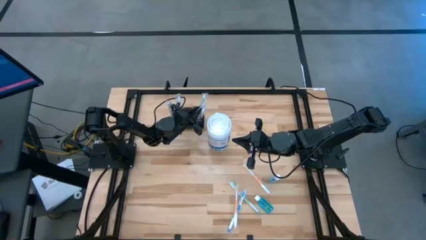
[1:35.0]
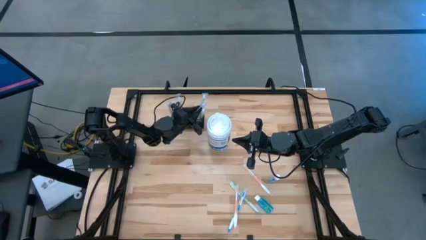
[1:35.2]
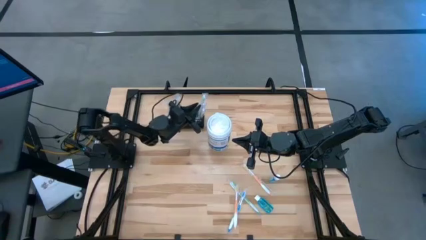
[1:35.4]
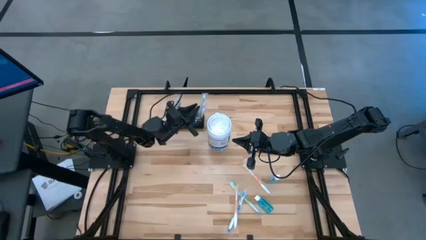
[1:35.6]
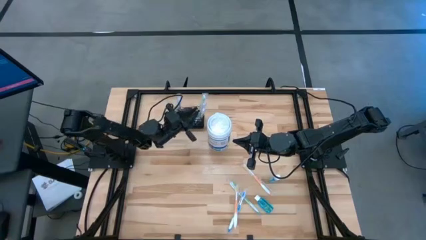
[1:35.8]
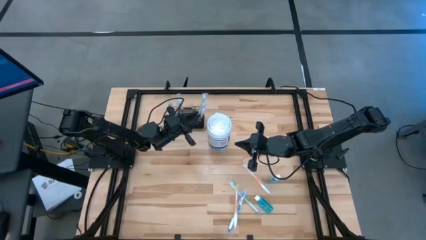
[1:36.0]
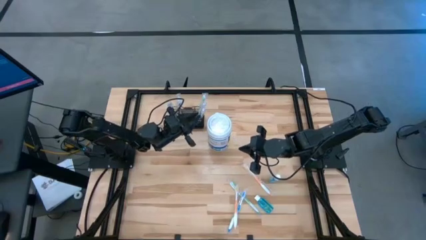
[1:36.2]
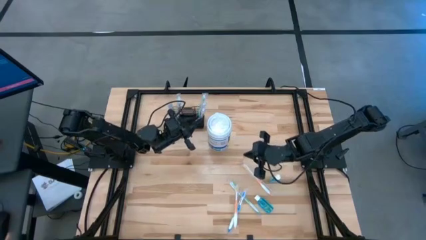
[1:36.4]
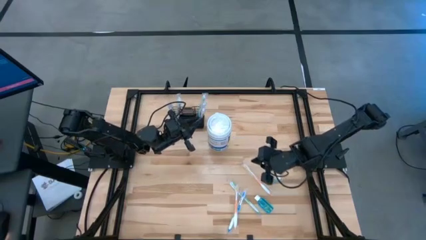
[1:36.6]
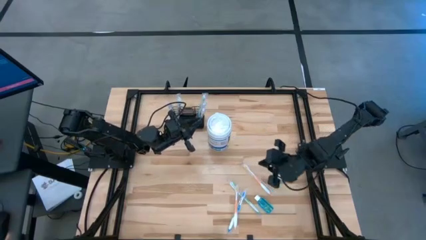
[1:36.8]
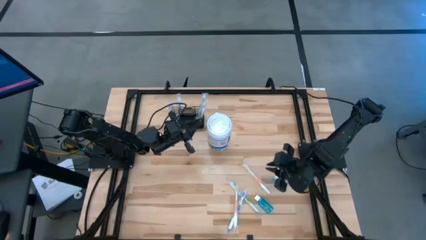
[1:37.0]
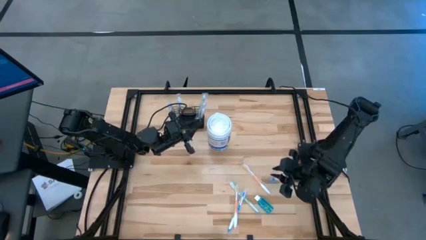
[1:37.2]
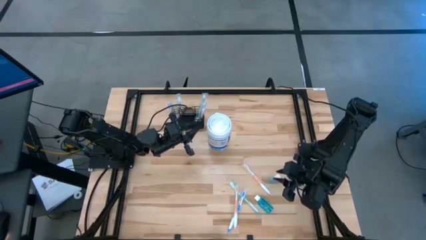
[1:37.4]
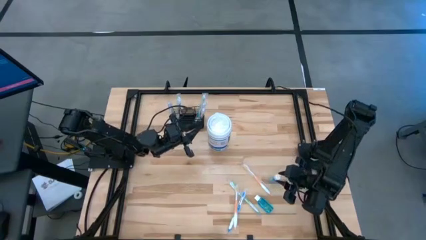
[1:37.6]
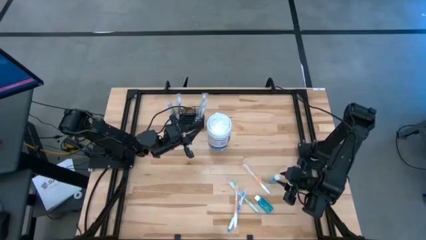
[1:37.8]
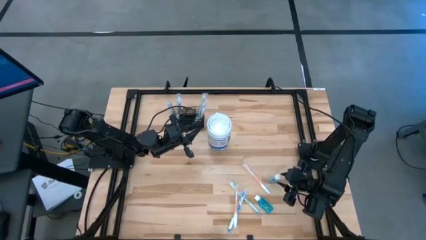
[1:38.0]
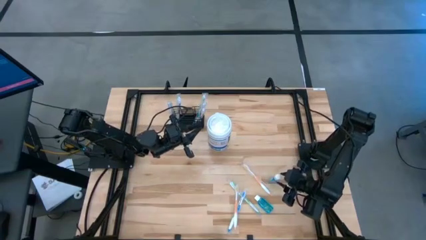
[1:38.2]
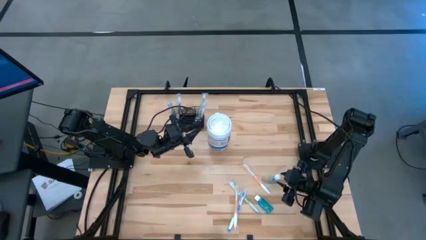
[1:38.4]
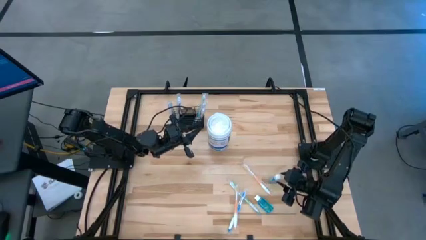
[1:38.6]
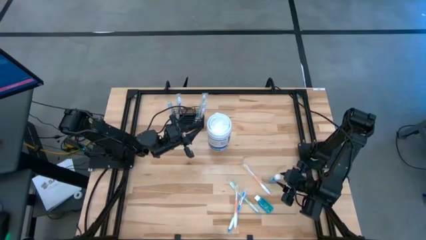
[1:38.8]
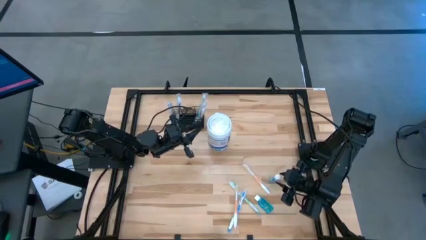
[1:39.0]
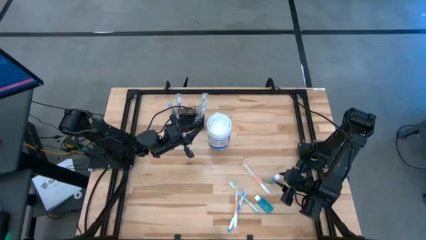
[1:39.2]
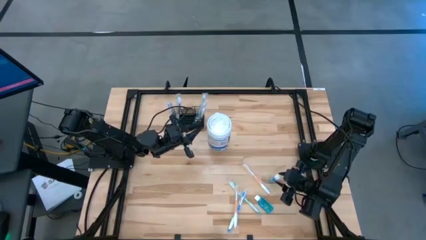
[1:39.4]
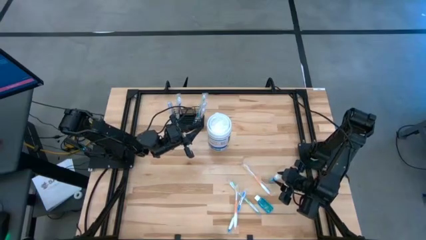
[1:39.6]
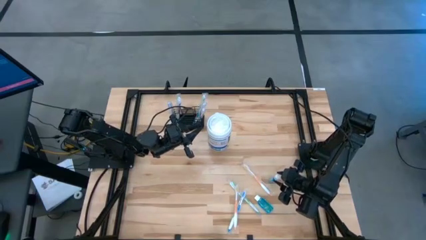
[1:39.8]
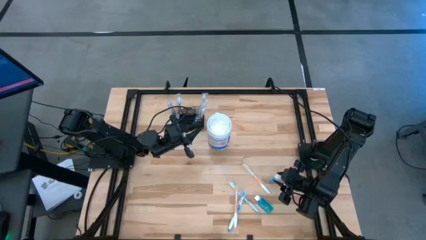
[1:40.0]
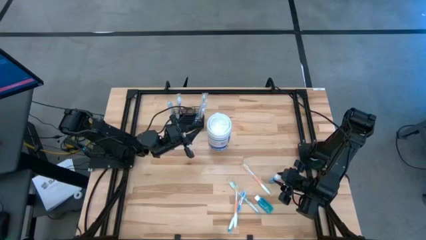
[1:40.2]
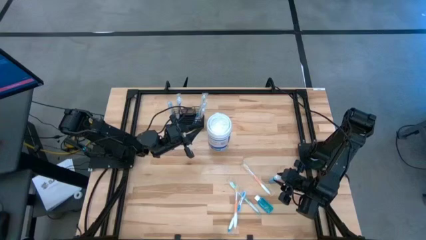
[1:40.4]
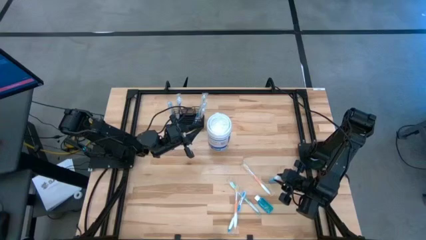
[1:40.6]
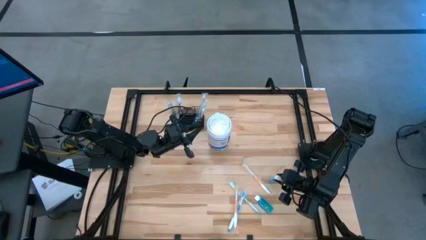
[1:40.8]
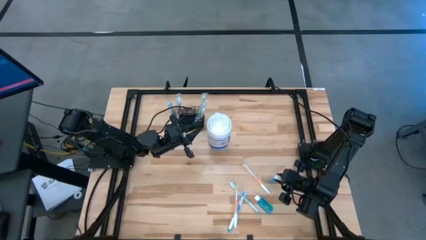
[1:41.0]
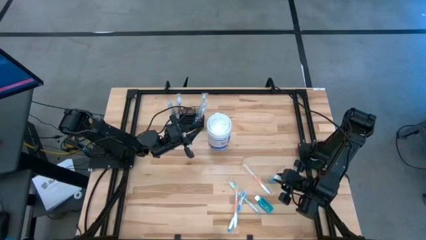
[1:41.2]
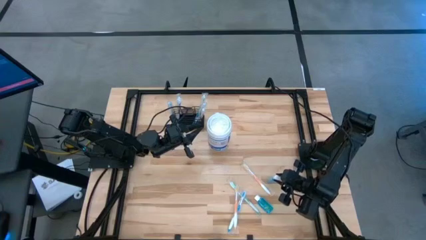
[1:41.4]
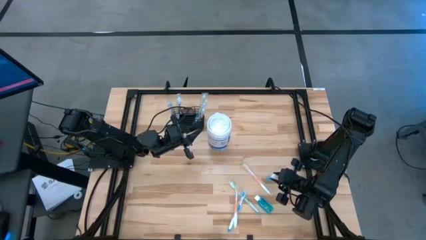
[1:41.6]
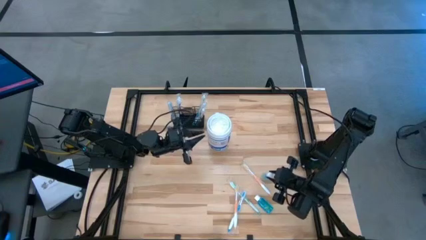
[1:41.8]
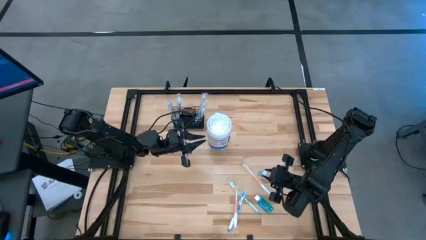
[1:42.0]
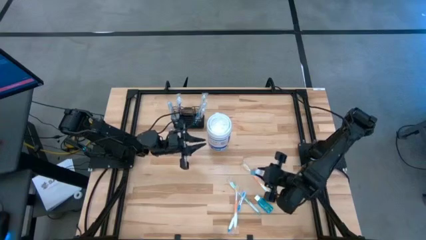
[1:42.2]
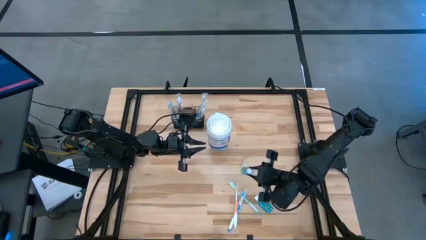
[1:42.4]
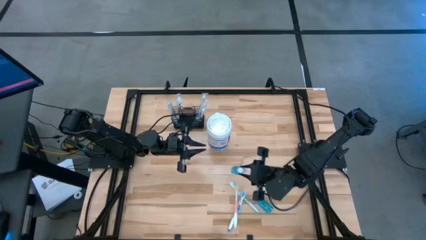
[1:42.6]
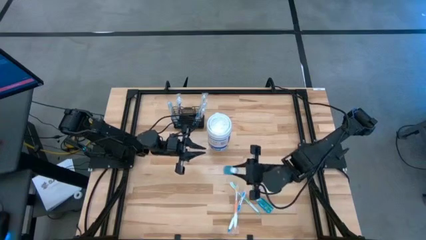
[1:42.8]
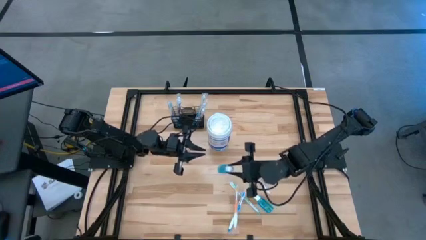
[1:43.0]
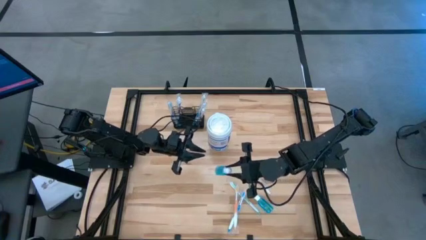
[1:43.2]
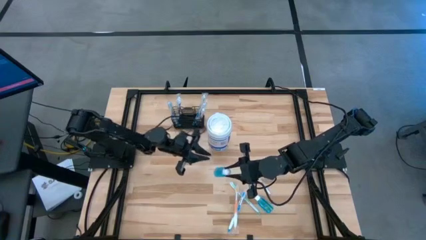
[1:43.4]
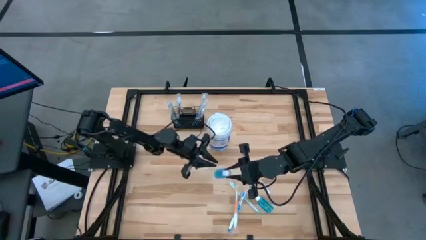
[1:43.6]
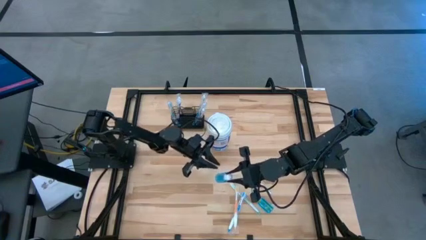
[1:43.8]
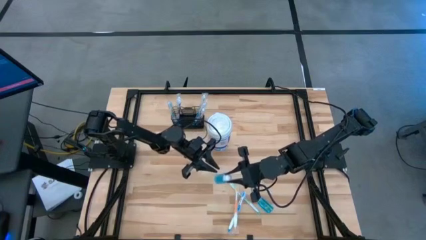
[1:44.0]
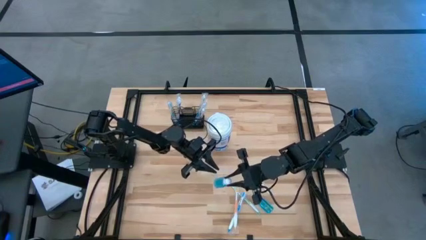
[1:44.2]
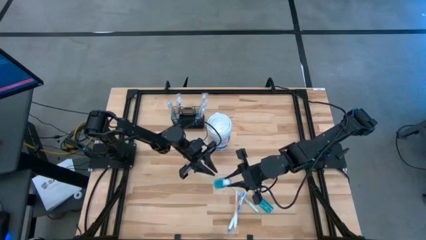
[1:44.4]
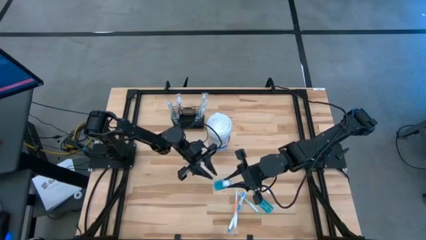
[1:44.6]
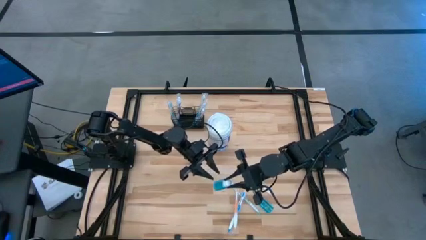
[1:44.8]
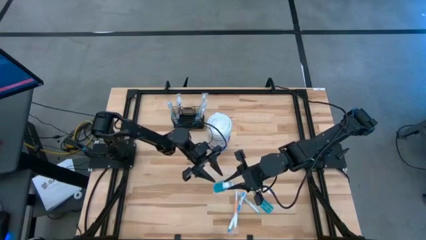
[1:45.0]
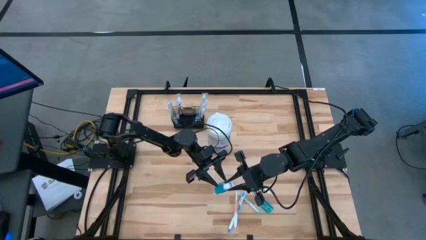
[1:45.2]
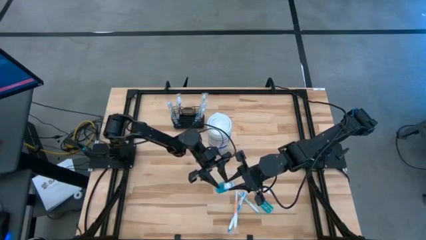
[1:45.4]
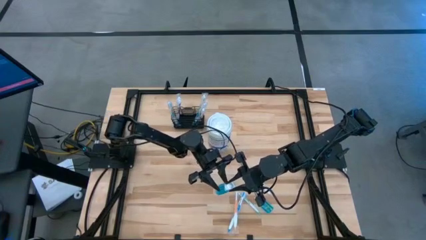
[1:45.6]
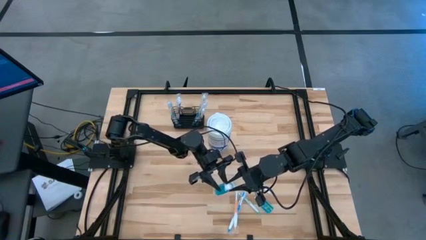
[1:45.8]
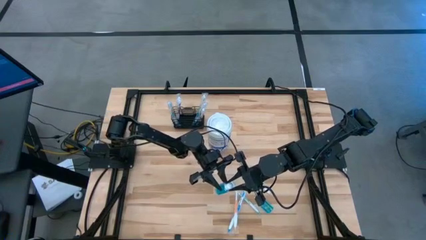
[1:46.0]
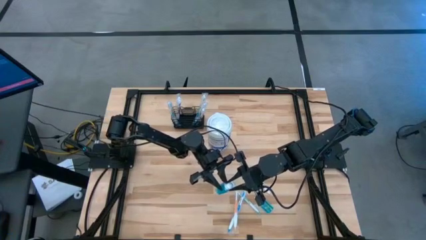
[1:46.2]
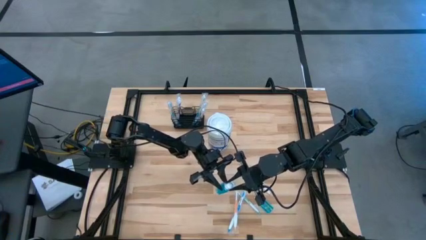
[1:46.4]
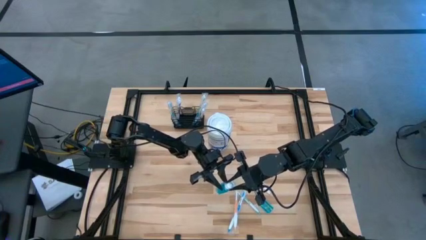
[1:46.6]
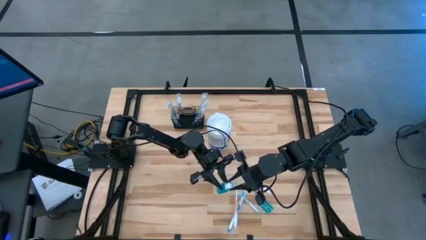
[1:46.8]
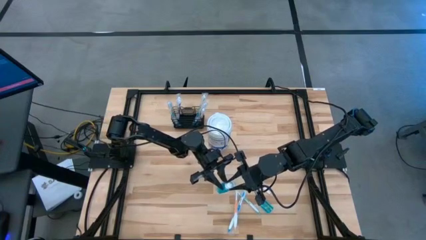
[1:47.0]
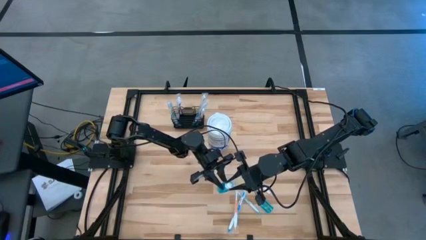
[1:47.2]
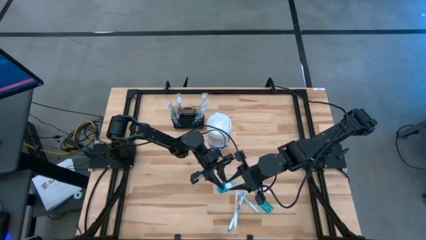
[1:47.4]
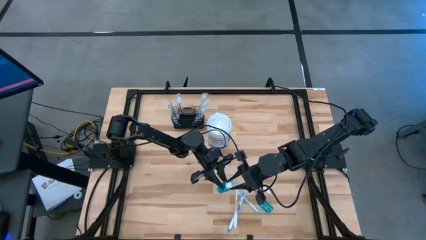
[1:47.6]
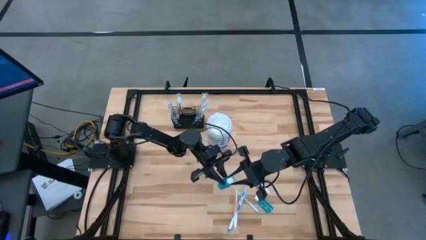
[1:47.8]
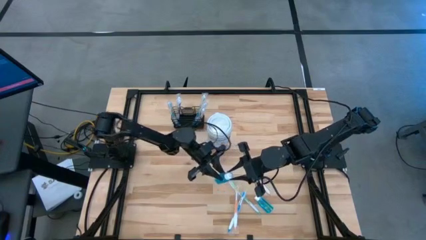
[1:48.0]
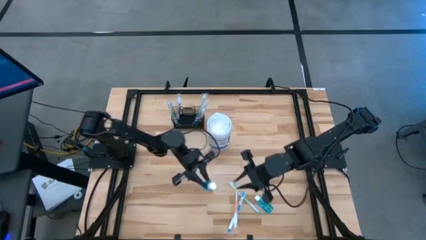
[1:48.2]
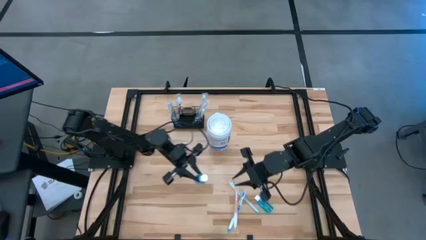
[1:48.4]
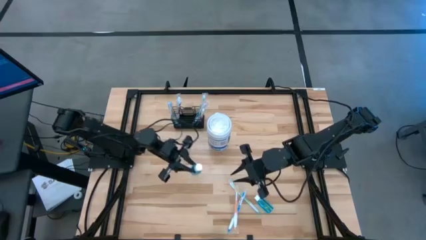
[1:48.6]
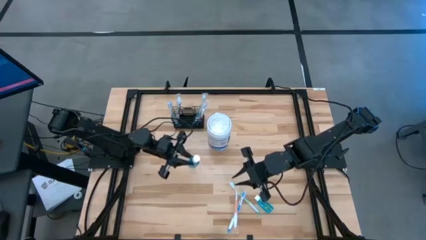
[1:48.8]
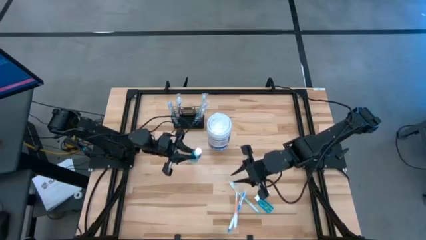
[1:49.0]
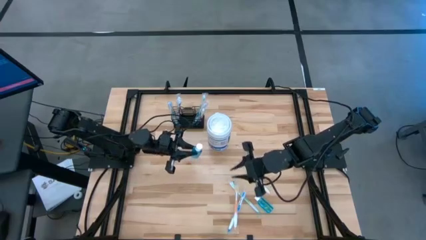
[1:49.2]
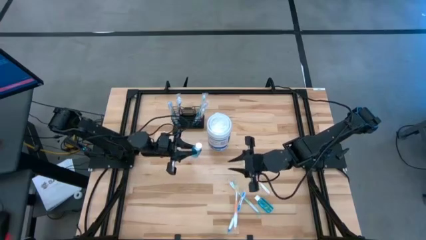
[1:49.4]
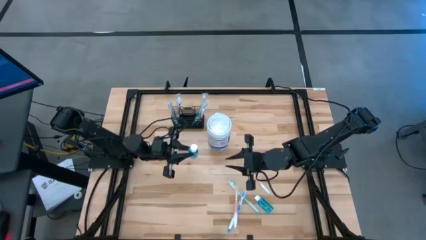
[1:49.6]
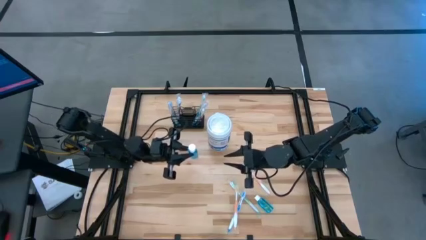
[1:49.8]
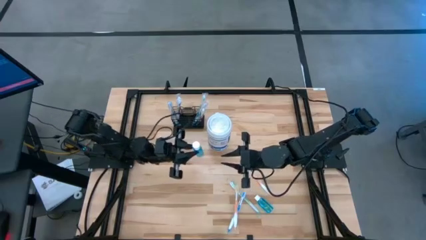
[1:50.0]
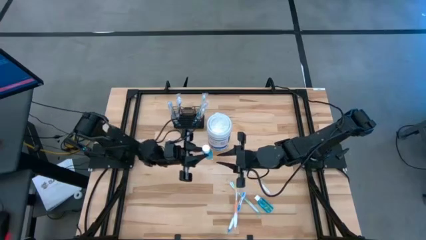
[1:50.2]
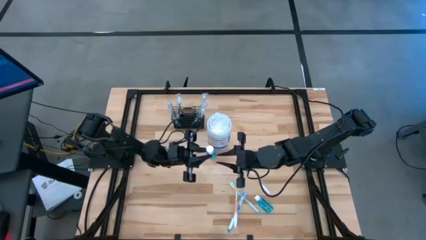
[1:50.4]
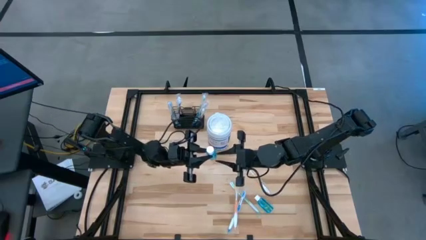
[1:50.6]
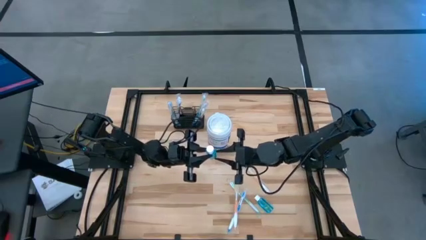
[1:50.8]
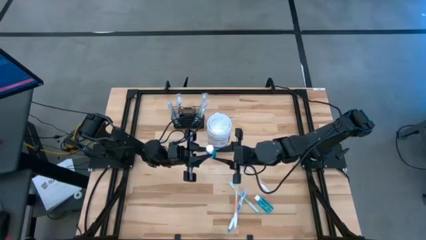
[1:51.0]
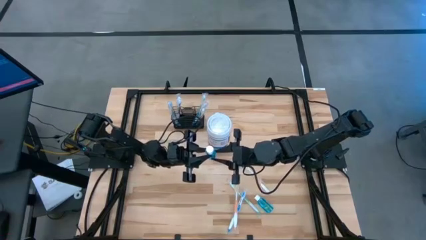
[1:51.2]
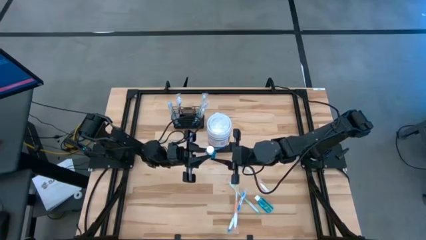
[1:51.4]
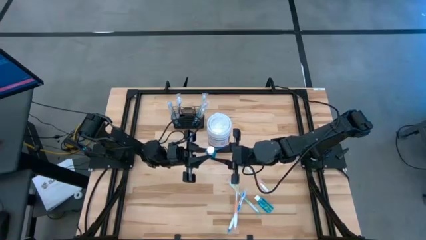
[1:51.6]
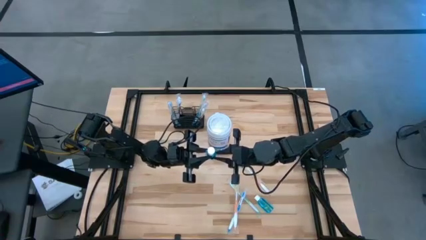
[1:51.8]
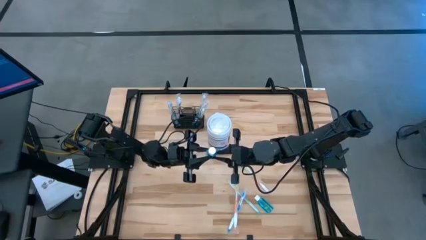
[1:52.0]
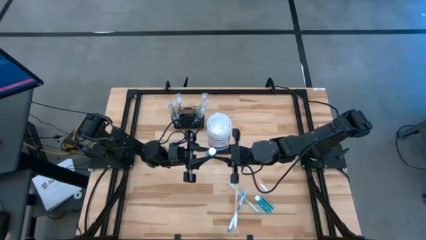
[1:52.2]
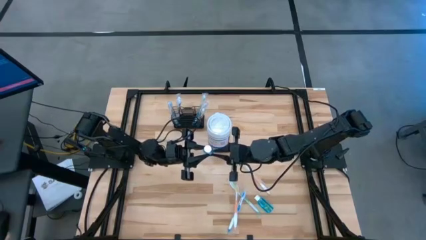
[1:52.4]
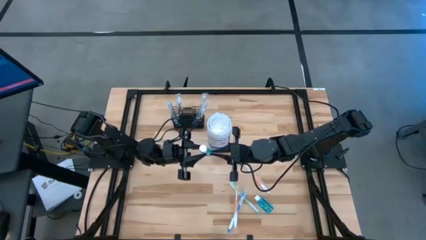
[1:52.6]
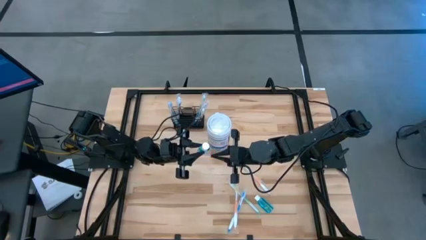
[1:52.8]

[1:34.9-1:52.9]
Task: Pick & Place toothbrushing station
Put the top blue mouthwash into the mesh organizer
